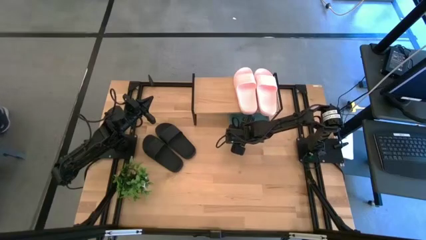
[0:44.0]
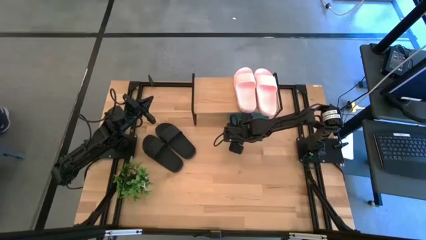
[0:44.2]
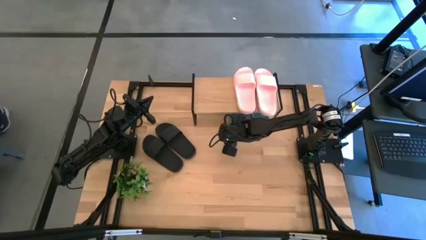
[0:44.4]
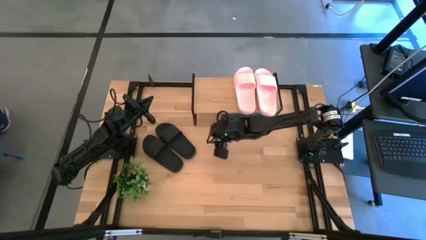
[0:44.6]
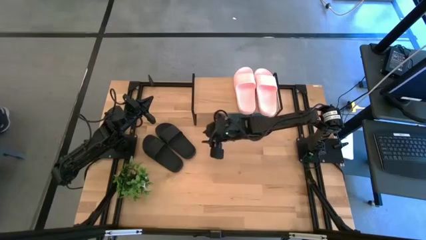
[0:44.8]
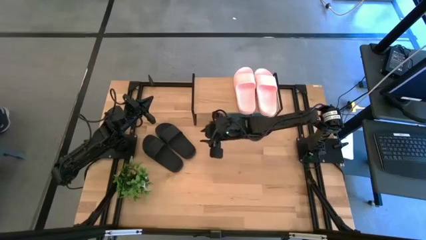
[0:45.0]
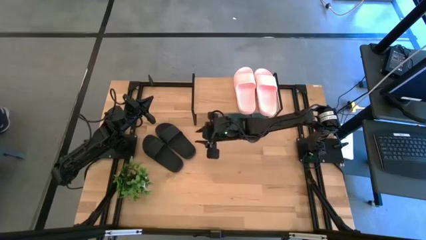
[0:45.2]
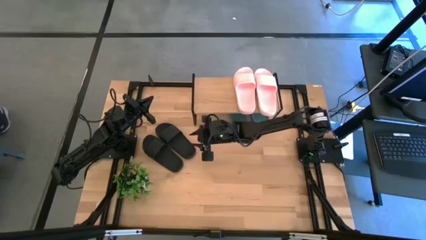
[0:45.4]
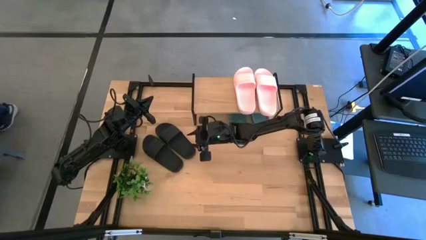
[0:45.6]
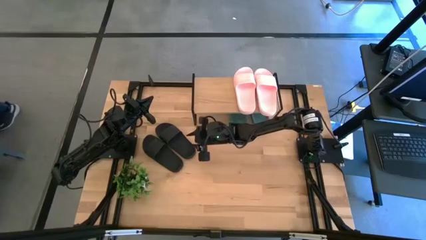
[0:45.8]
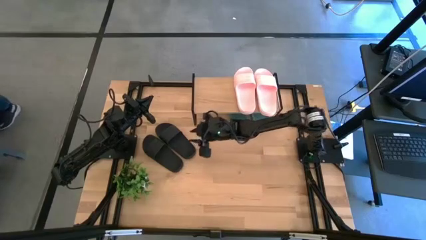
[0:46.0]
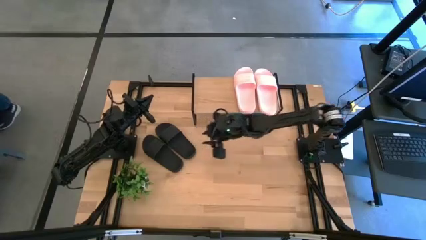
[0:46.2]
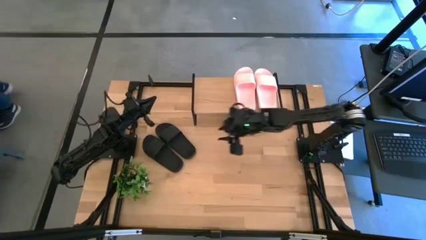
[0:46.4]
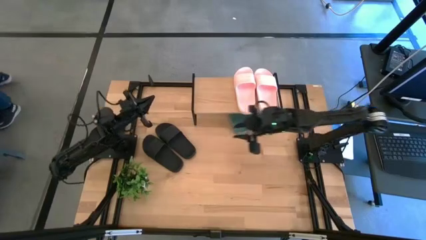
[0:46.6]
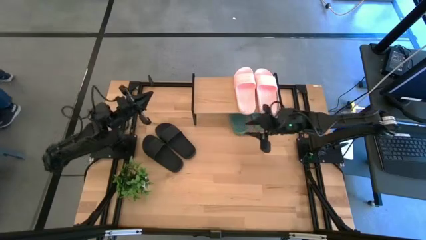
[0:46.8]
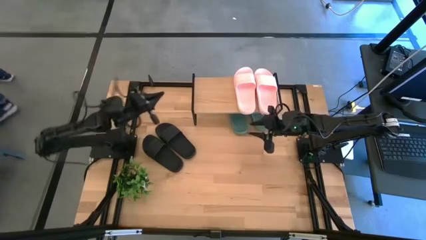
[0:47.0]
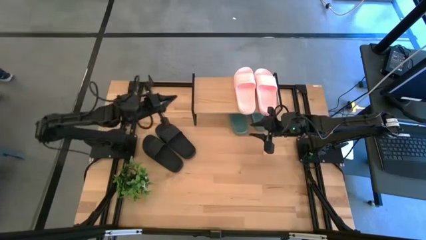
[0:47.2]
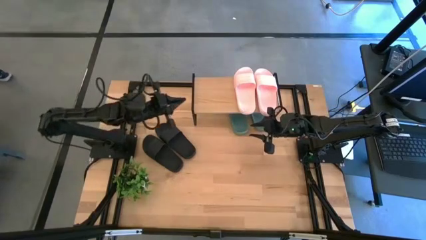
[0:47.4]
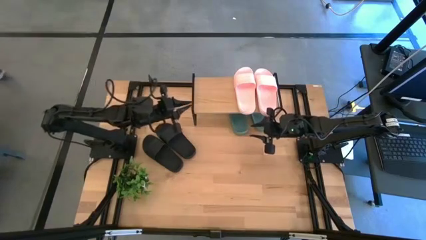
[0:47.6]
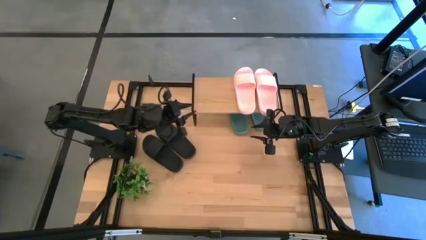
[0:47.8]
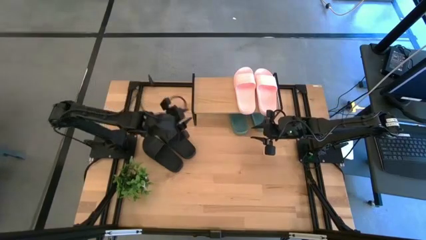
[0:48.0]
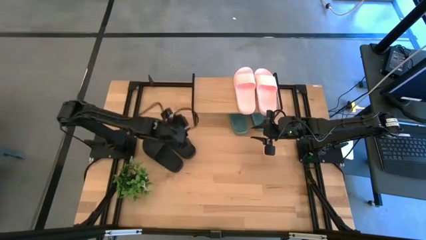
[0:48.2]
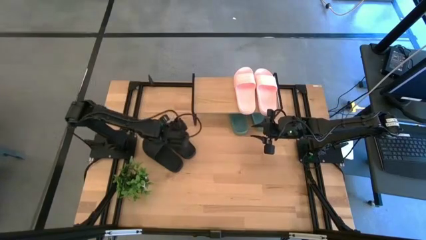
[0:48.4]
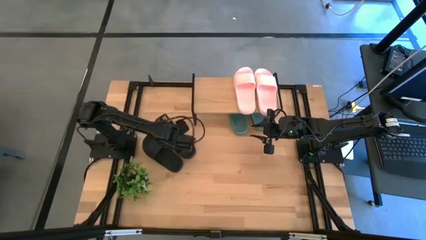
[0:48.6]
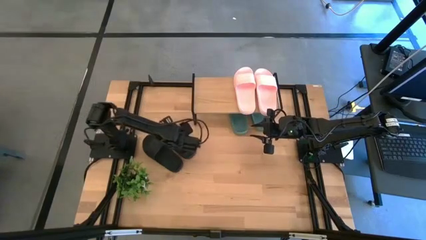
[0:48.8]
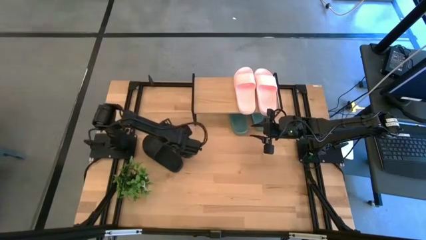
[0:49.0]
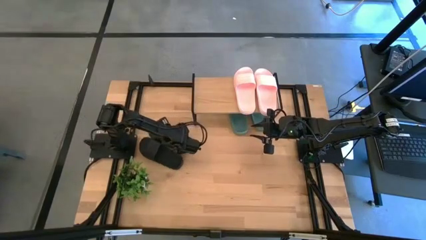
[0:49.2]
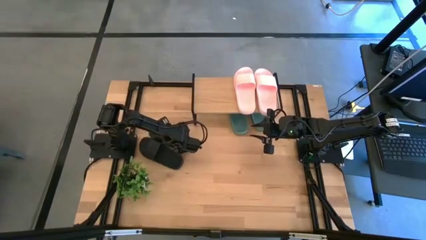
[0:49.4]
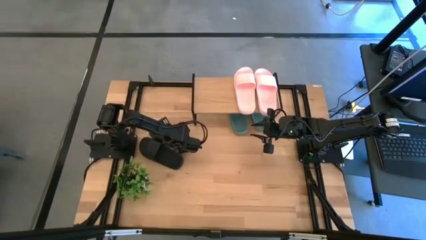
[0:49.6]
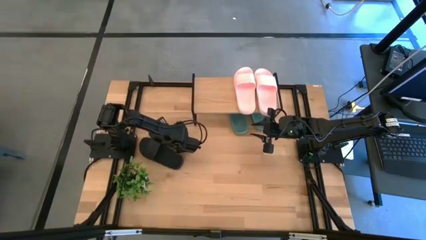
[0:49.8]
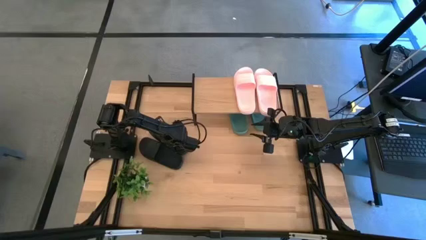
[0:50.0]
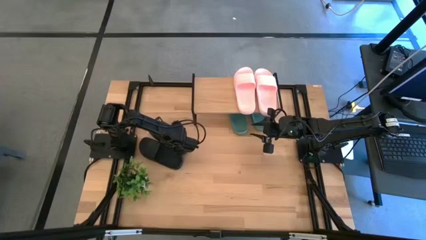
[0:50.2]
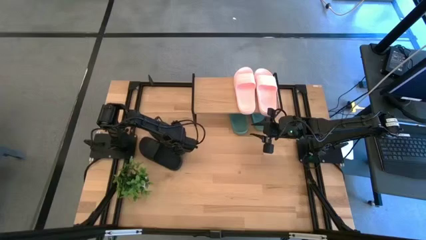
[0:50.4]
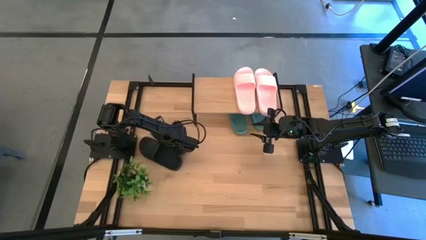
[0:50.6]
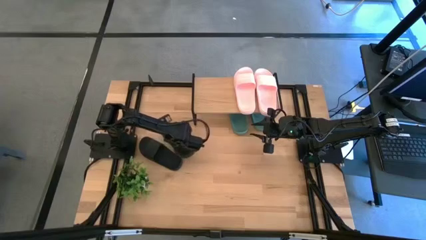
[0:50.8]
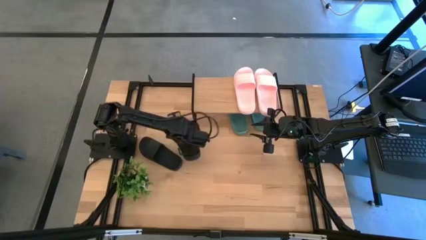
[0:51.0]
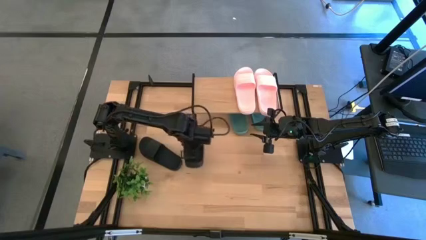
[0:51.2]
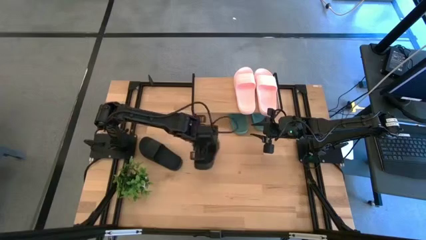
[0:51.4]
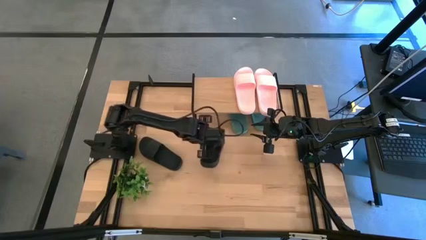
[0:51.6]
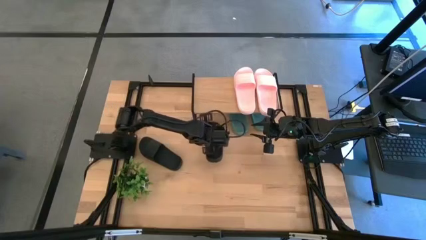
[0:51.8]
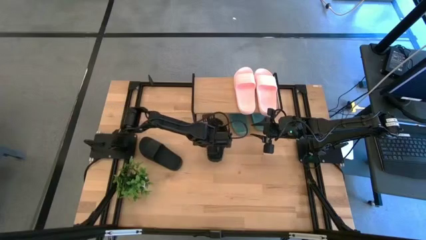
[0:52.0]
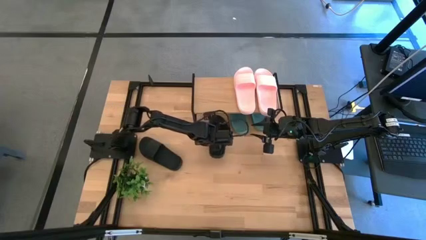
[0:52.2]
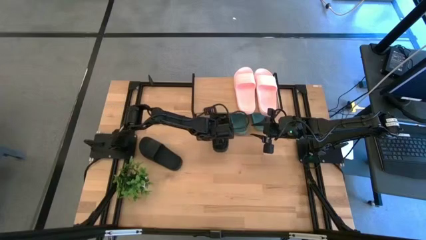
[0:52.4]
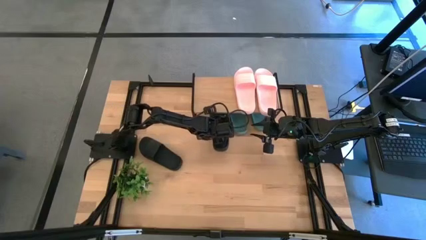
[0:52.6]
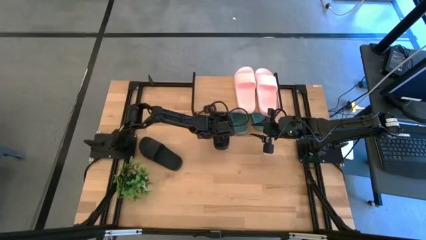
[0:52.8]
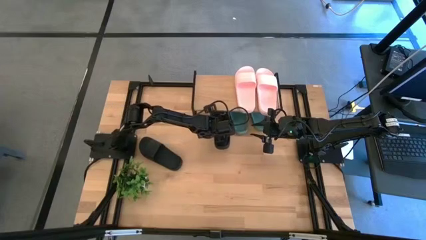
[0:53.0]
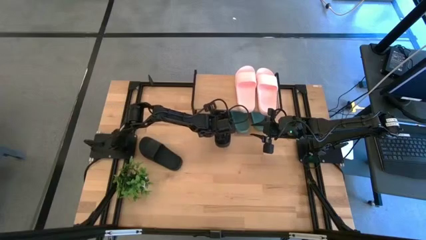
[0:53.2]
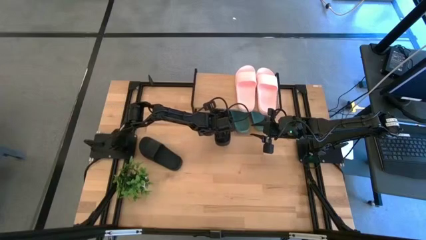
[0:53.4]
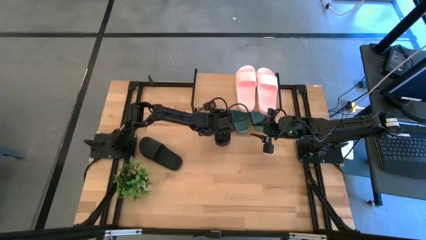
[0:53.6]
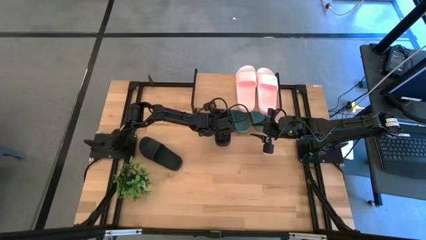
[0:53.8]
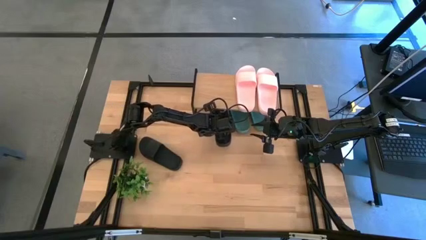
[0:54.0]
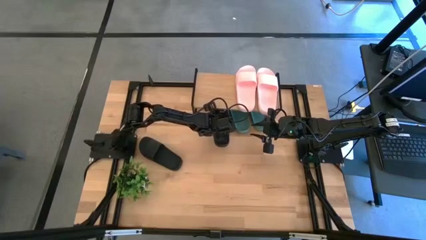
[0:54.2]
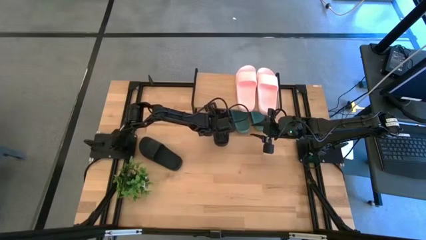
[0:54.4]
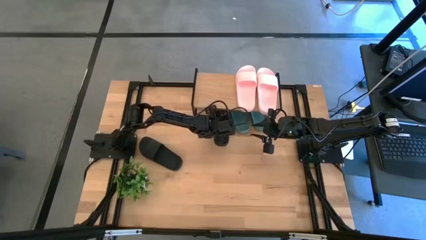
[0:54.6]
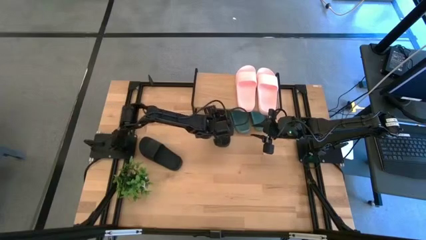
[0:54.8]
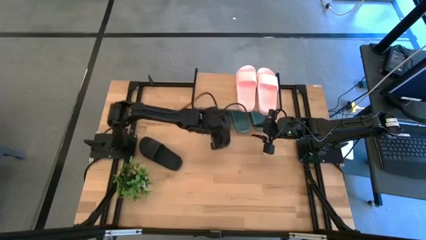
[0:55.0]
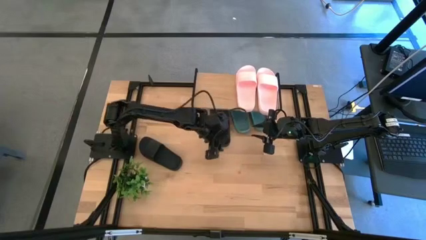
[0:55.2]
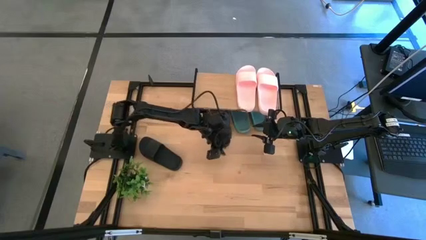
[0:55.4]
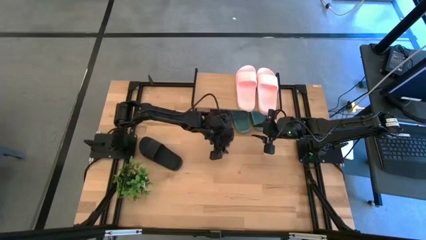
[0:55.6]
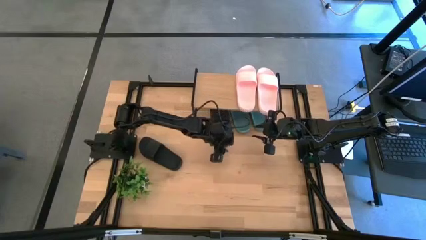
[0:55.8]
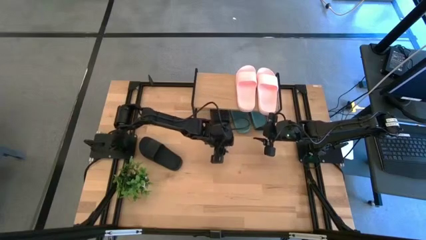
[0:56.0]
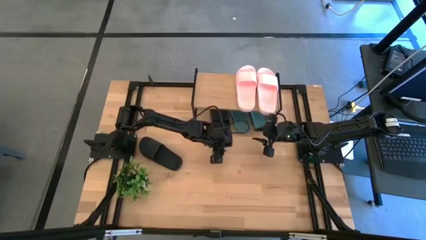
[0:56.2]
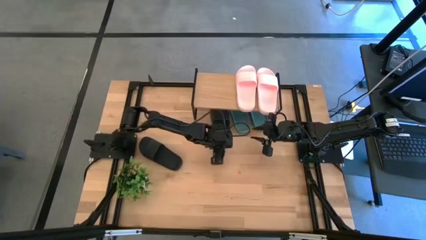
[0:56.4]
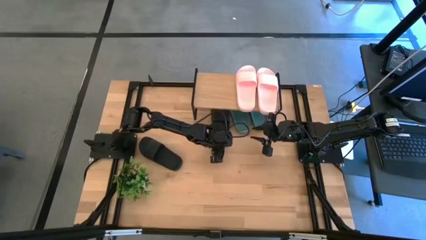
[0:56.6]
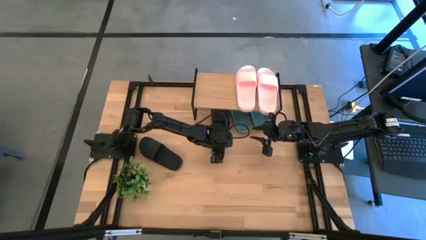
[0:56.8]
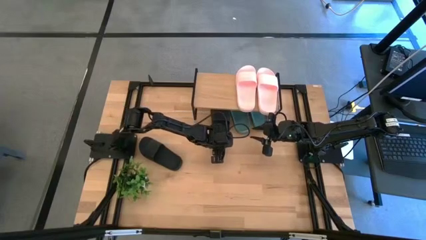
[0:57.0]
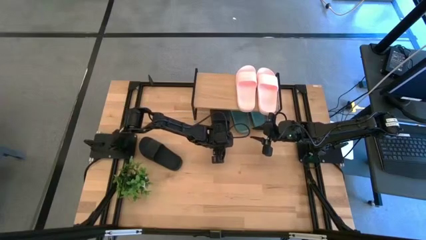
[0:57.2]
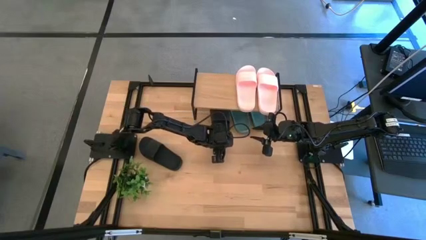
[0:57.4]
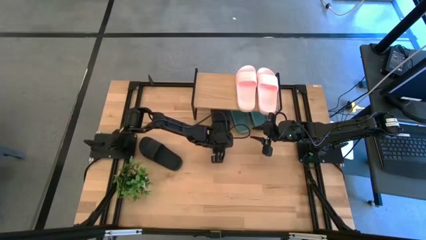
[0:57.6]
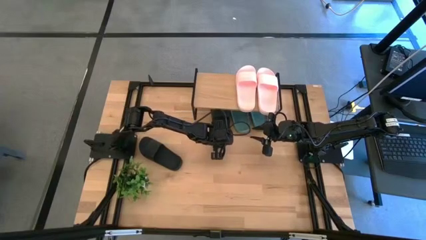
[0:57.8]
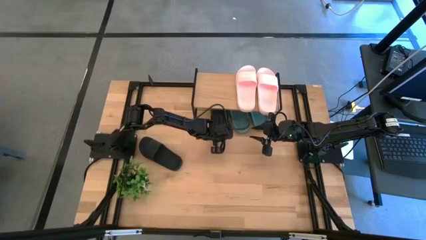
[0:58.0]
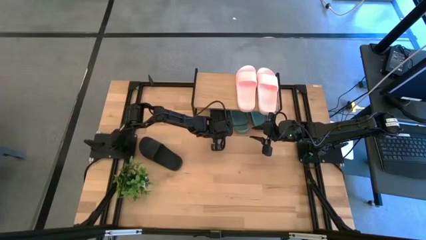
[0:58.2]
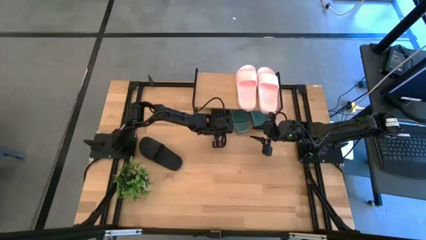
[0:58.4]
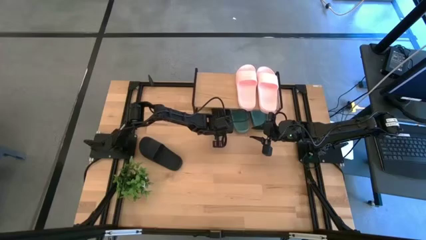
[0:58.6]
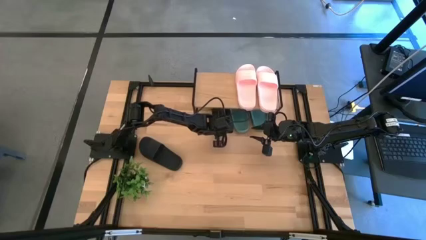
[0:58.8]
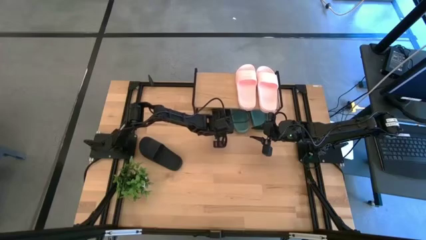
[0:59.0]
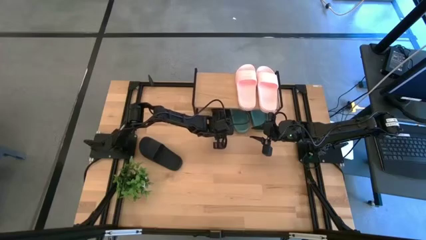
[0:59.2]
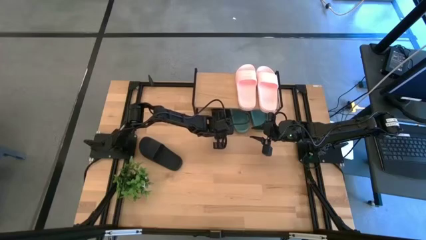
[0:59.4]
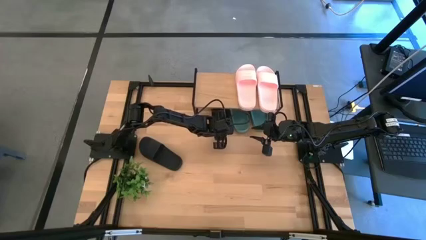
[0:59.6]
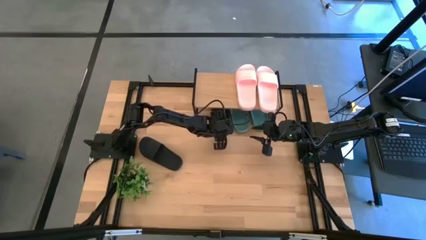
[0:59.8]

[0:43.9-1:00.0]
Task: Pick and place slides into the shelf
Put the right black slipper under the shelf

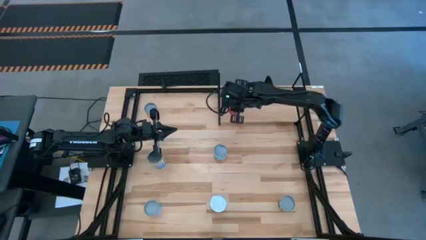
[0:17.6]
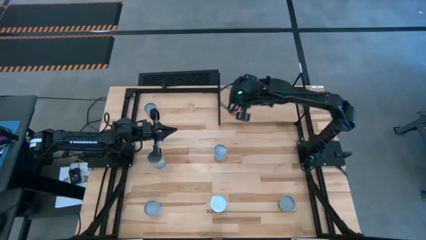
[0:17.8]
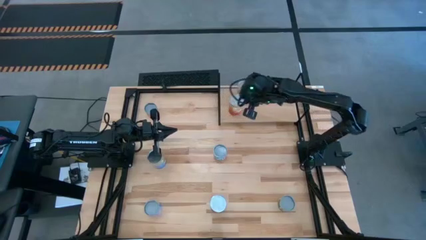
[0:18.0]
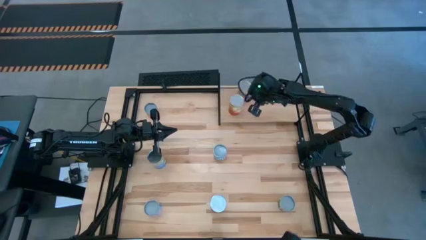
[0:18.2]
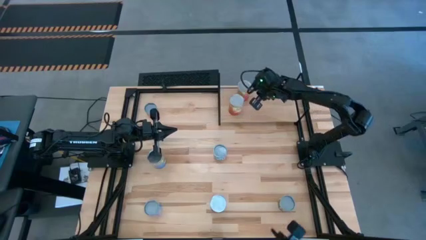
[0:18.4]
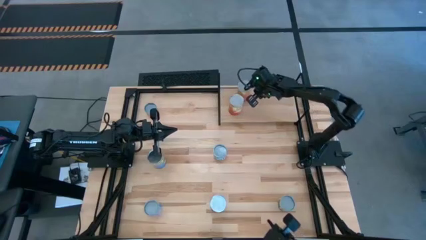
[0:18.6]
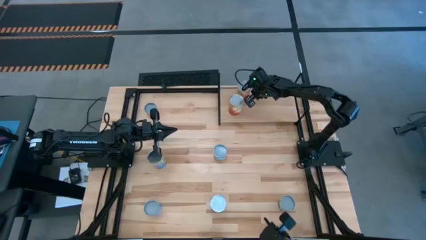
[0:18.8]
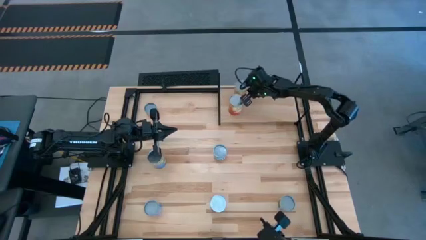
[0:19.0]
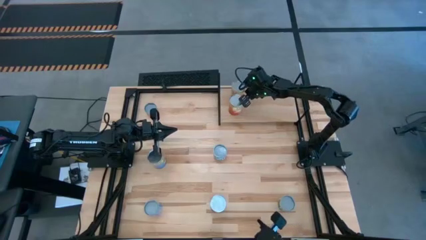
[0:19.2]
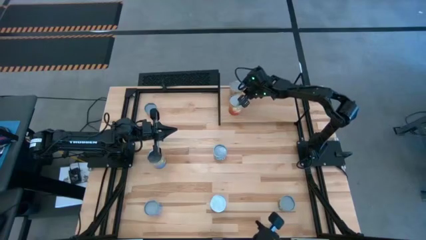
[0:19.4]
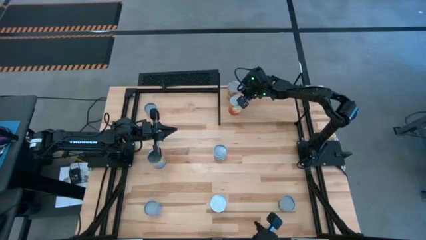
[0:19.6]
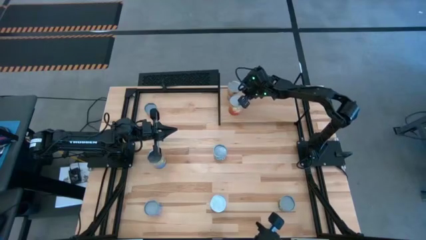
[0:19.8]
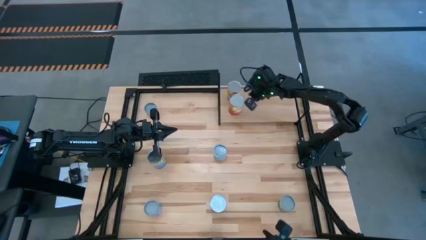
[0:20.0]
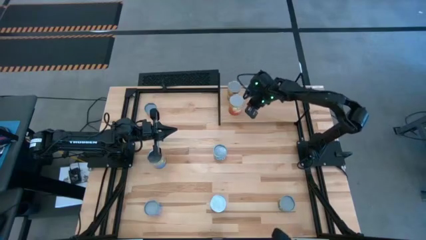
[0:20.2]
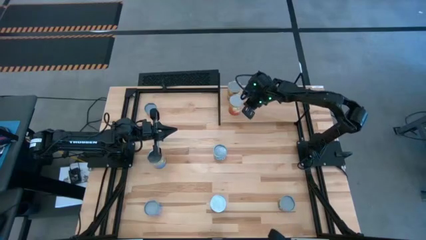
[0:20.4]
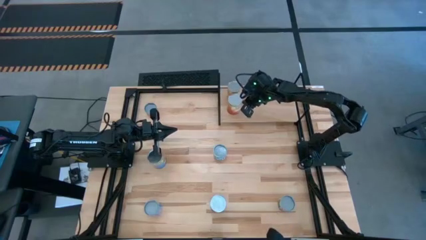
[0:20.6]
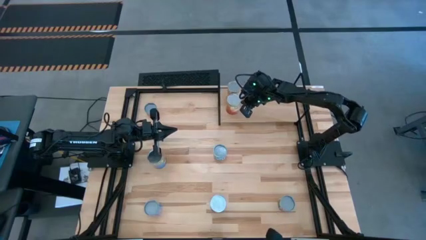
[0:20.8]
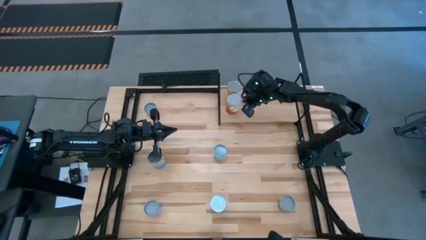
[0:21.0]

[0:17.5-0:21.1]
Task: Pick and place cans onto a shelf
Adjust the canned corns on the shelf
